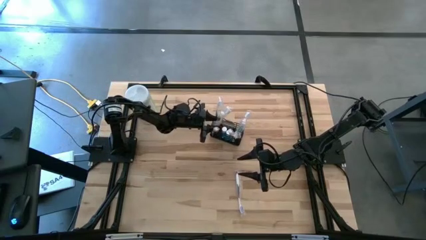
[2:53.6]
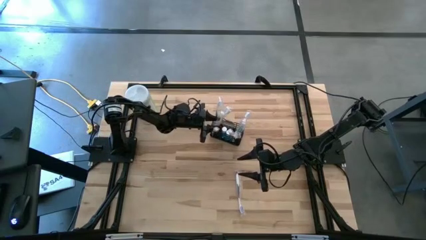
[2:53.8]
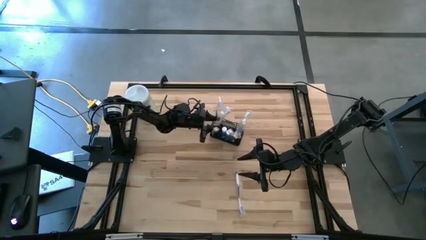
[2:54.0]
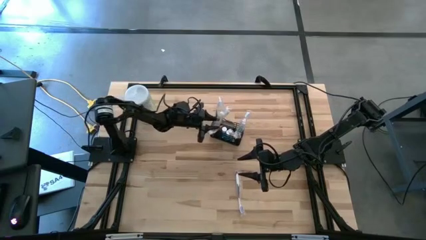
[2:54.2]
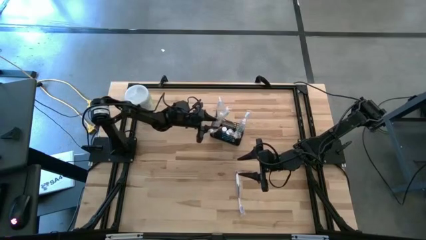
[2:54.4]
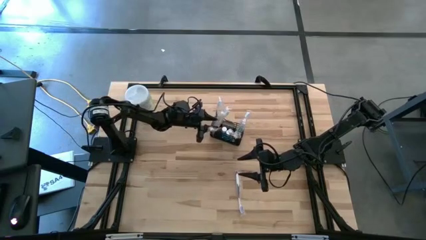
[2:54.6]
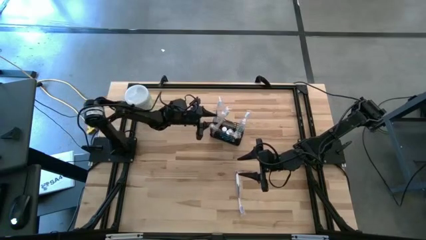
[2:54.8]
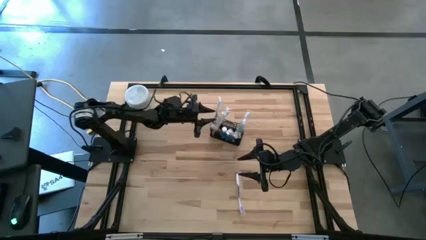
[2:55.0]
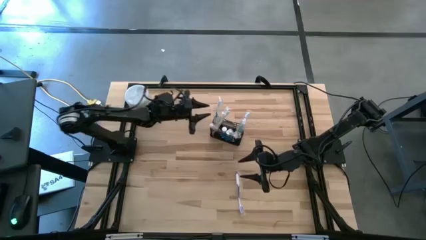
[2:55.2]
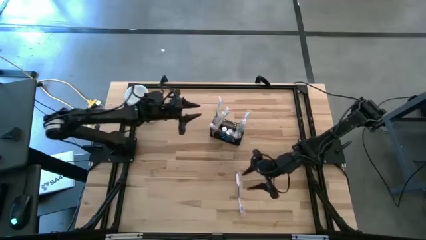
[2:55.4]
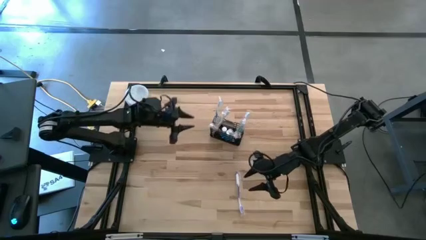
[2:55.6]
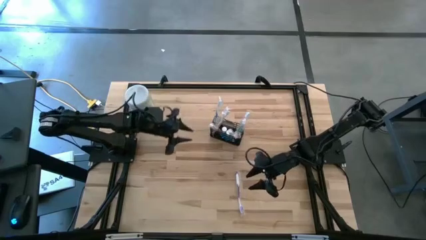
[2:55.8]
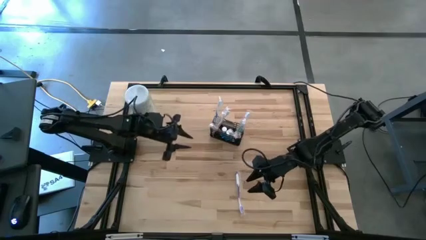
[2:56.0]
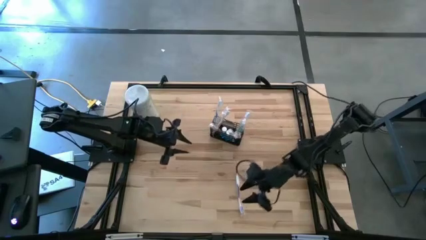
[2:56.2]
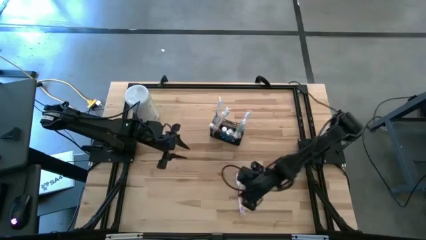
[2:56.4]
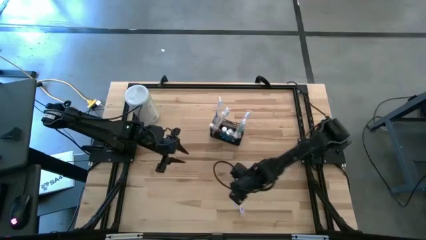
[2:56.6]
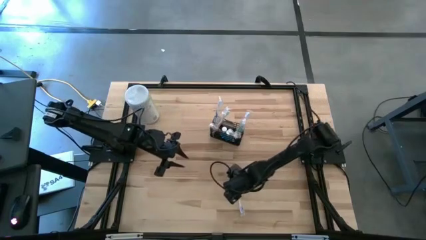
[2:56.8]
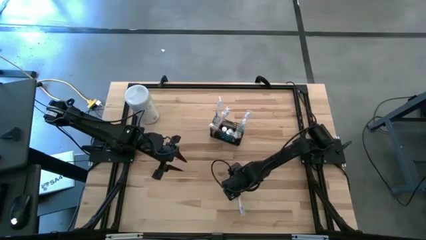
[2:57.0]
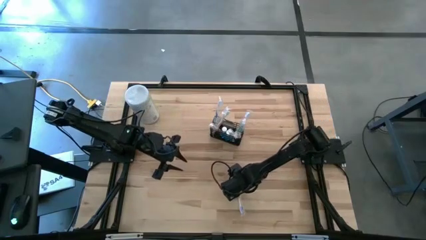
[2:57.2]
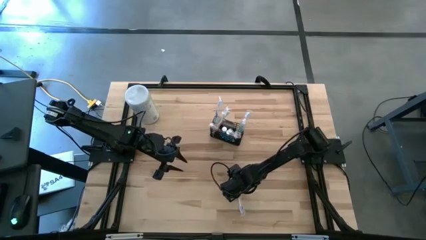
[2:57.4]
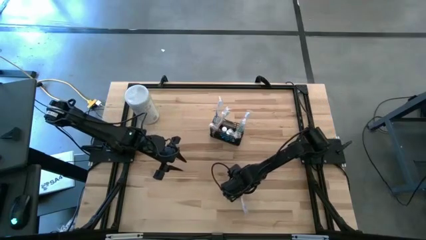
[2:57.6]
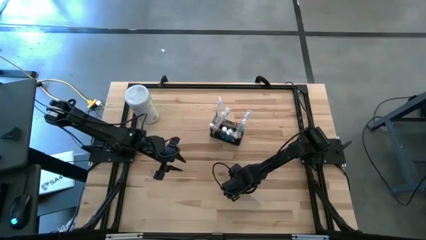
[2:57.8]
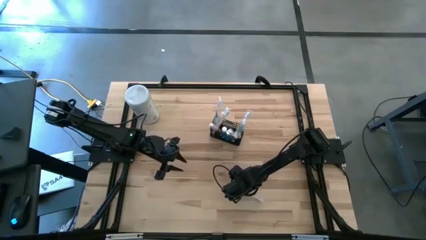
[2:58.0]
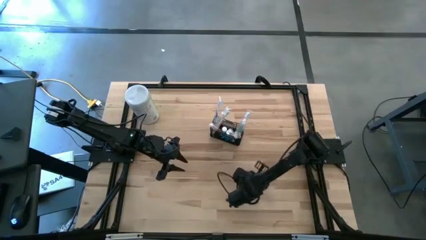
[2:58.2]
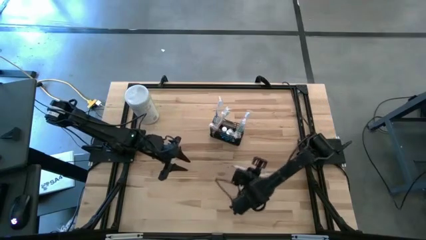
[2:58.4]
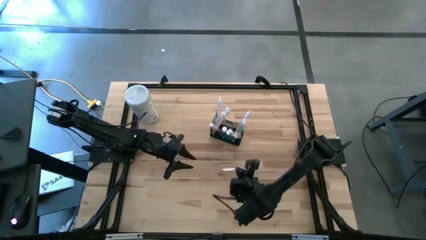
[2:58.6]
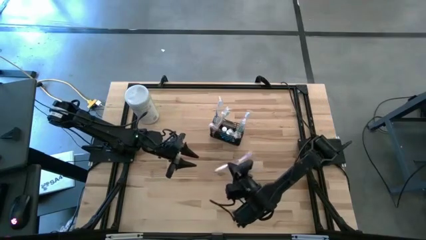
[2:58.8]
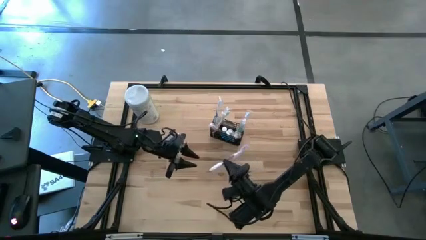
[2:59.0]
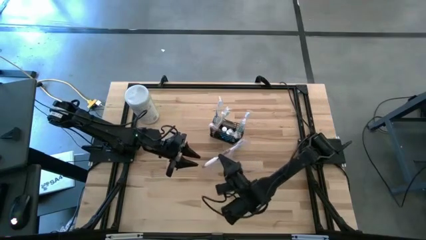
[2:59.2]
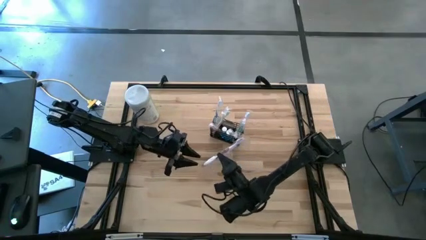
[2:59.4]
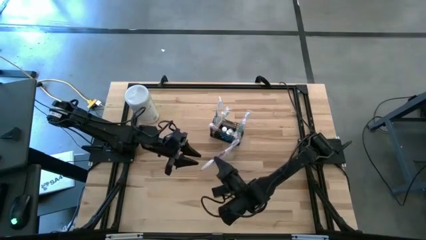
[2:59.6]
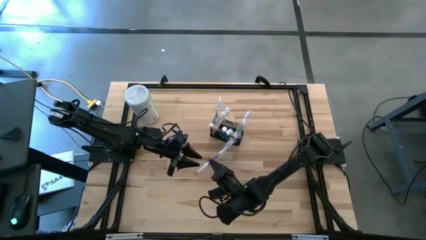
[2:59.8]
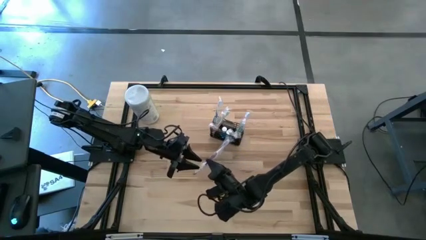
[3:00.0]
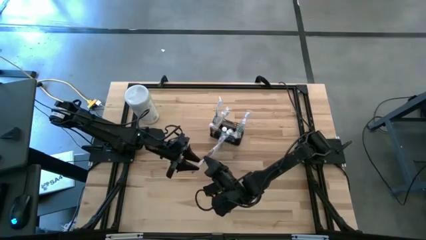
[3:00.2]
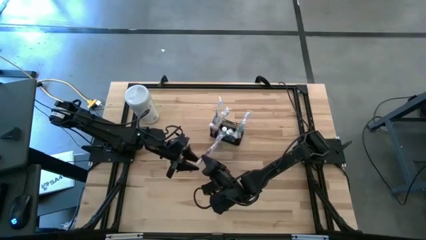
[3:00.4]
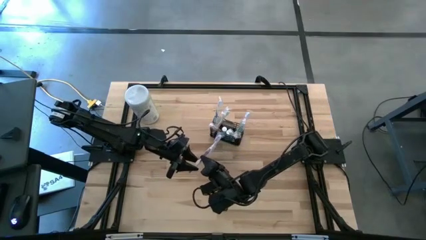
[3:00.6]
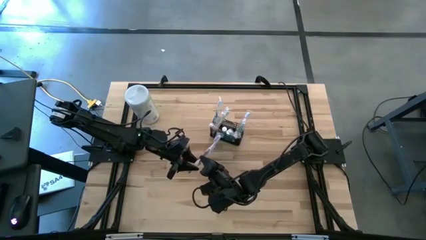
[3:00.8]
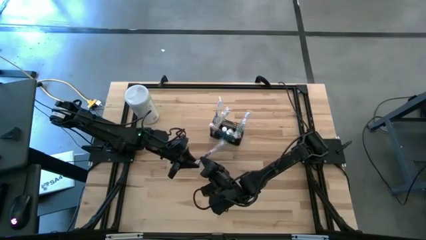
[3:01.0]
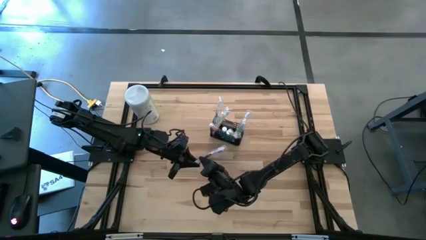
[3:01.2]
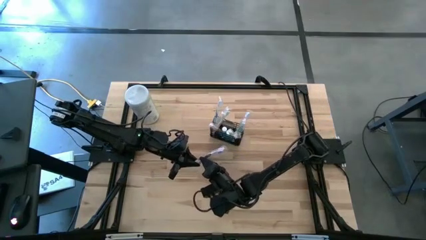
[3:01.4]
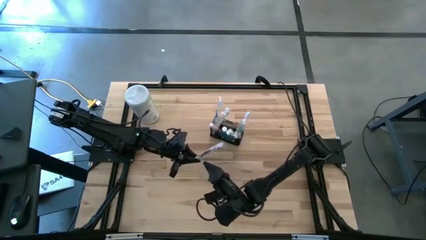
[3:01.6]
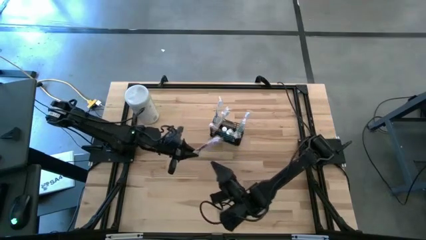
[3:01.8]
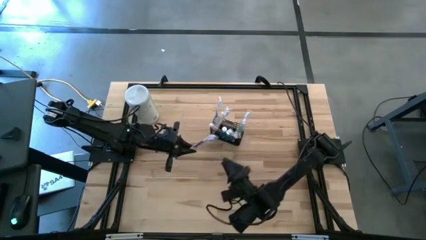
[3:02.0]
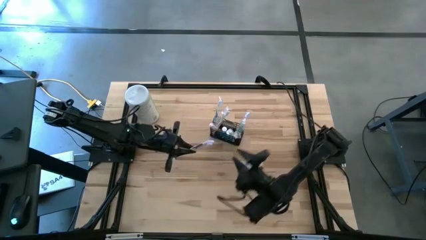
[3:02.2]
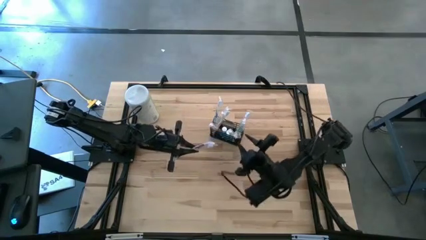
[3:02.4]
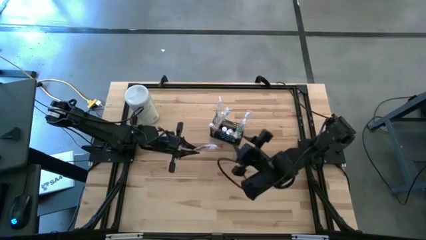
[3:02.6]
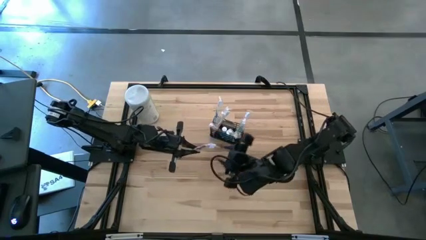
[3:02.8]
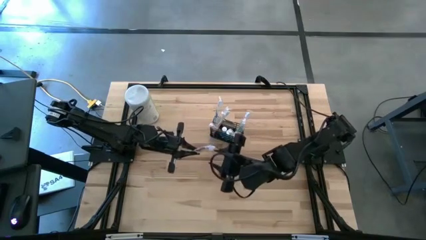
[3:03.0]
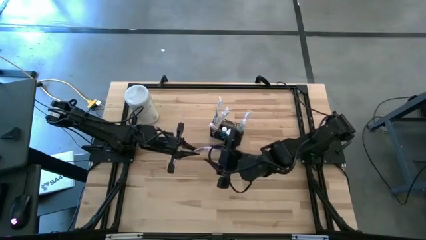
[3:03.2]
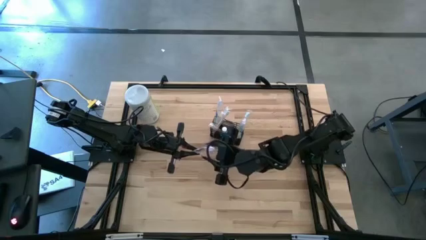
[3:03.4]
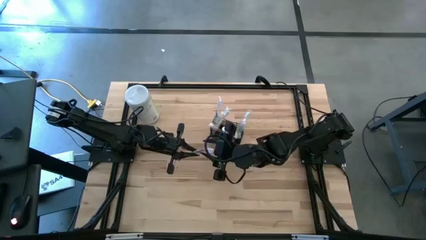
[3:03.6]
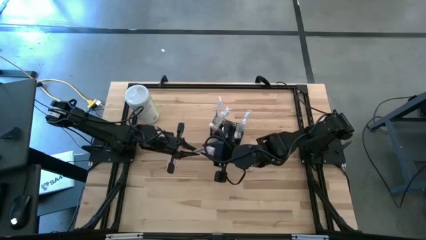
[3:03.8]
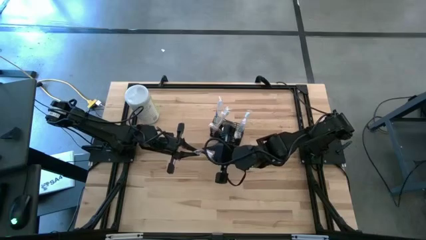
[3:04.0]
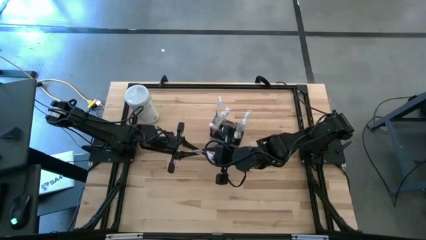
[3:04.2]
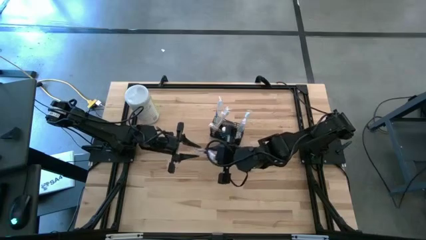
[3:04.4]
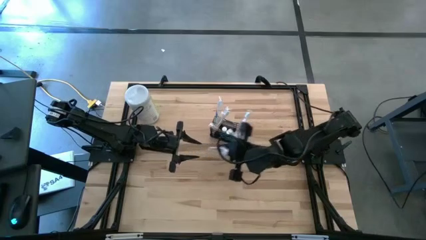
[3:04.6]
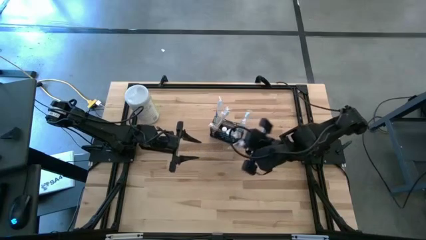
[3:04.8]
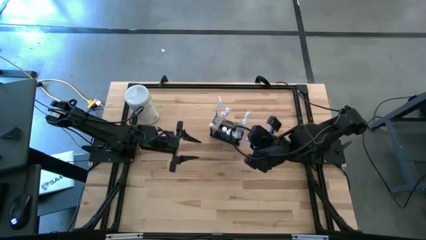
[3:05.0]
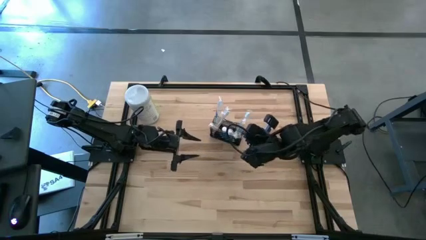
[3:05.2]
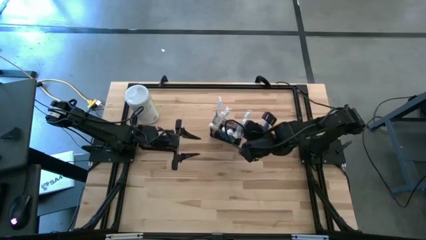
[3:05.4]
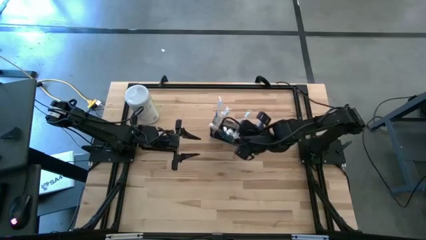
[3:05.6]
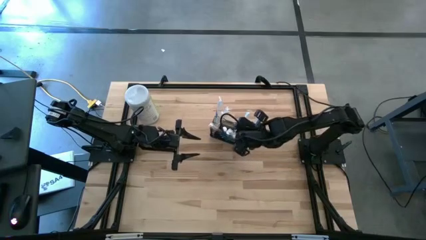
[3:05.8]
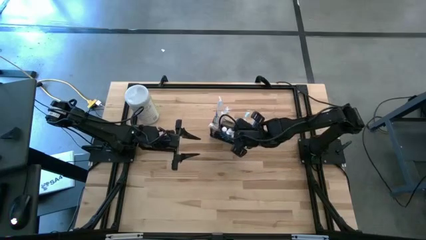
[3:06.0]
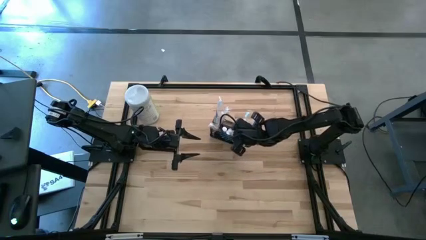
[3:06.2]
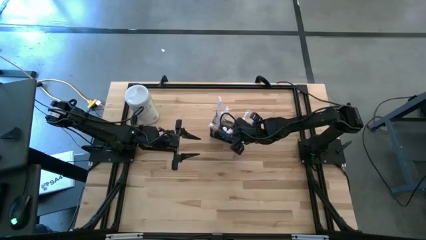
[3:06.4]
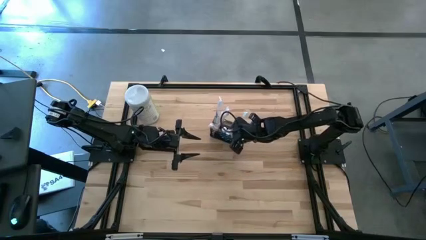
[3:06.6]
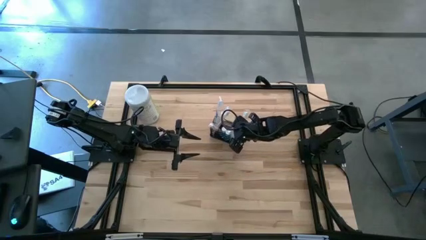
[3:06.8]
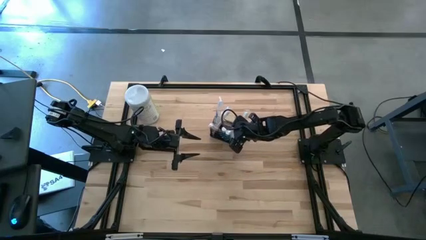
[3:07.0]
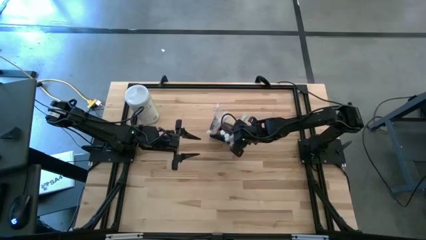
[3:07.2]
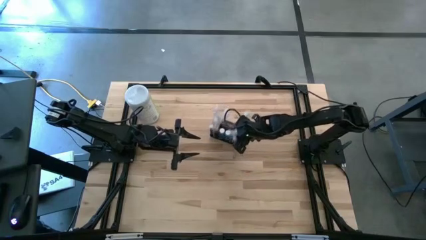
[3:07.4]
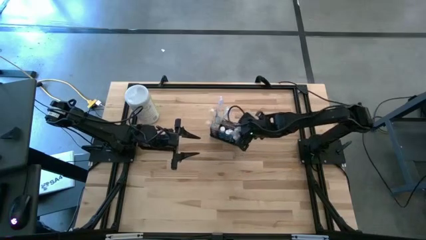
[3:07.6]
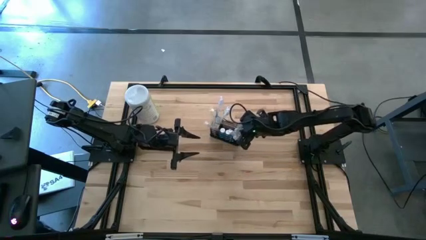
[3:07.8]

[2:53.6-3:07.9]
Task: Pick & Place toothbrushing station
Put the violet toothbrush into the mesh organizer

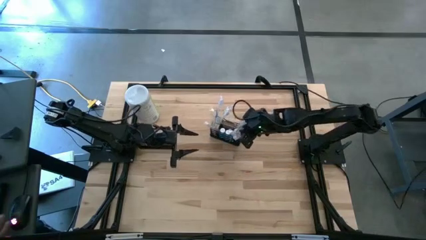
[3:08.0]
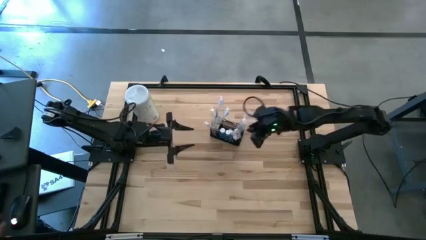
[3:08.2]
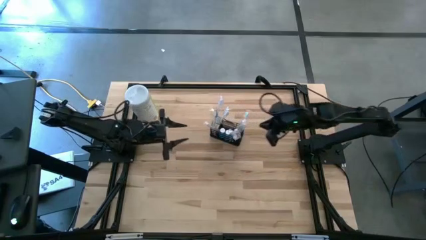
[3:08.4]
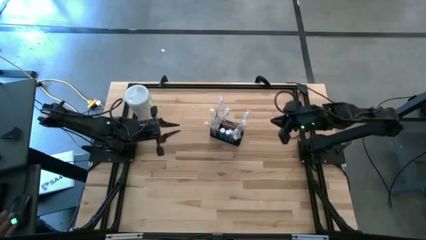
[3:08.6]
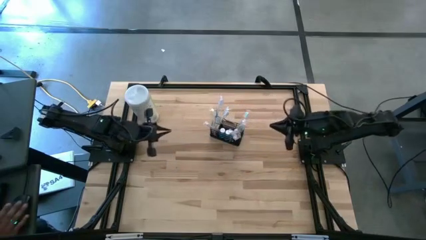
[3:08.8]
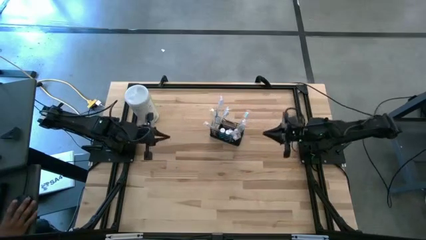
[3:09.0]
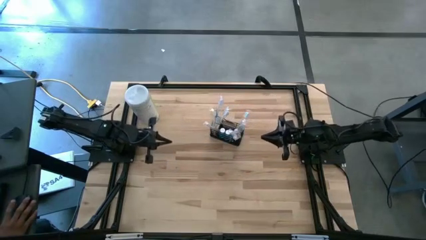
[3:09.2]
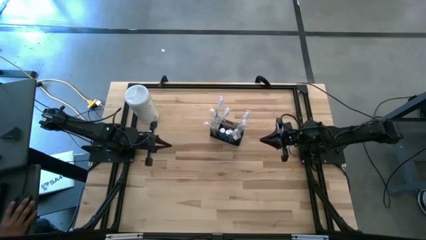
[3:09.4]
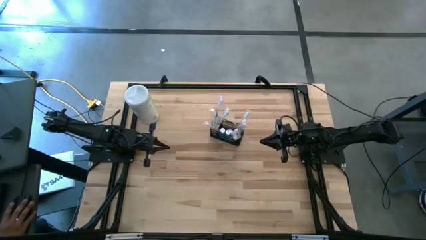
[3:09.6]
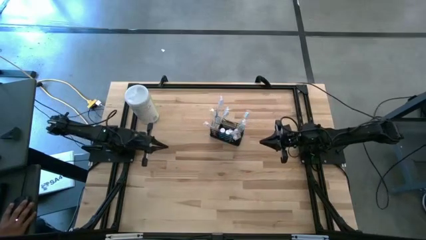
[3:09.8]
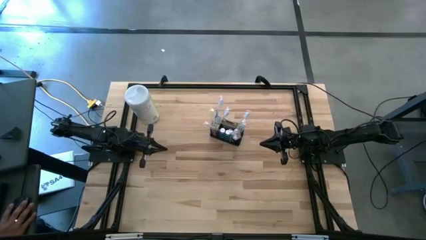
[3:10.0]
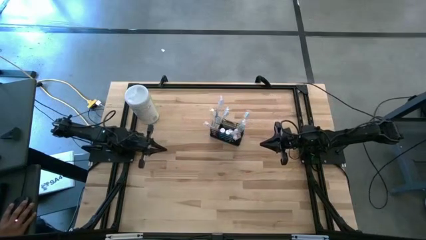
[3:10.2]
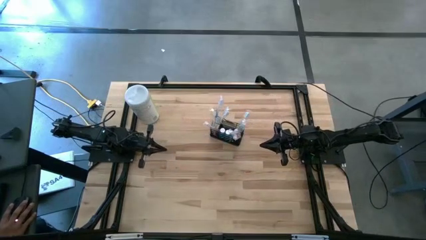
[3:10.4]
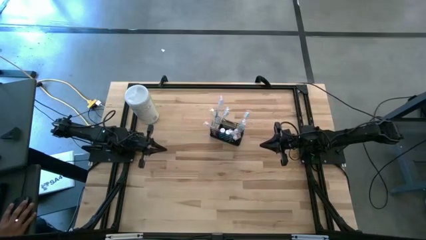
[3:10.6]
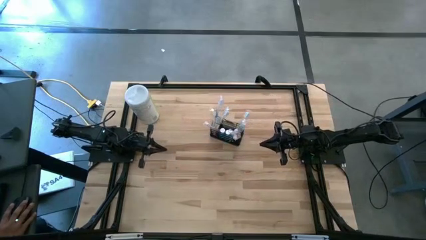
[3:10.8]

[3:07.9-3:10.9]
Return to Home Position
